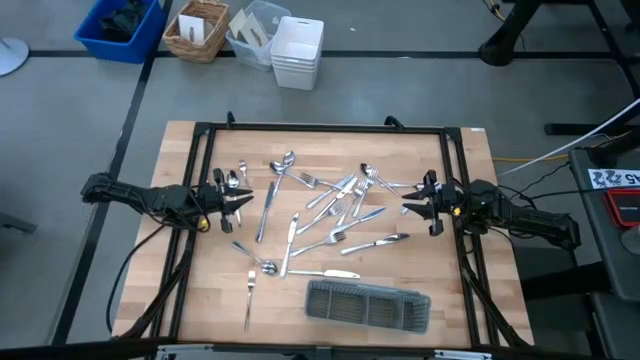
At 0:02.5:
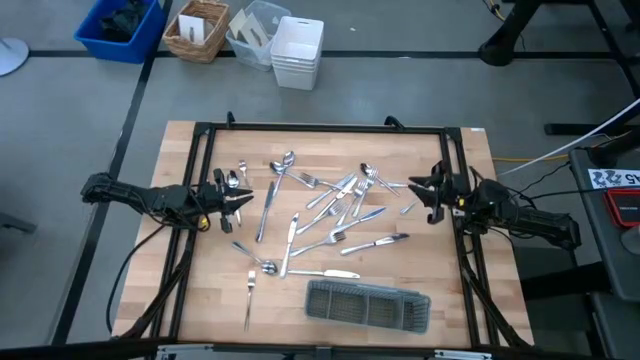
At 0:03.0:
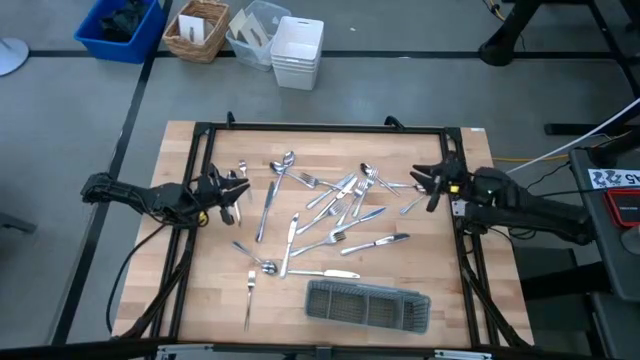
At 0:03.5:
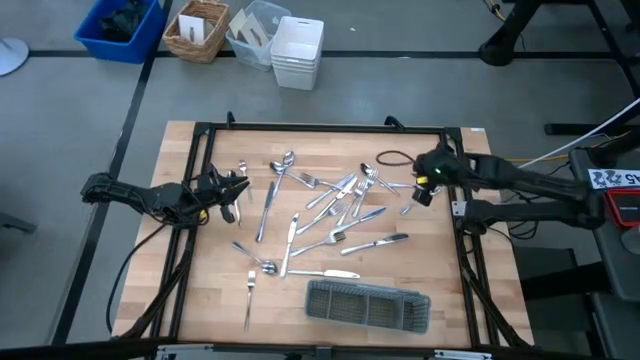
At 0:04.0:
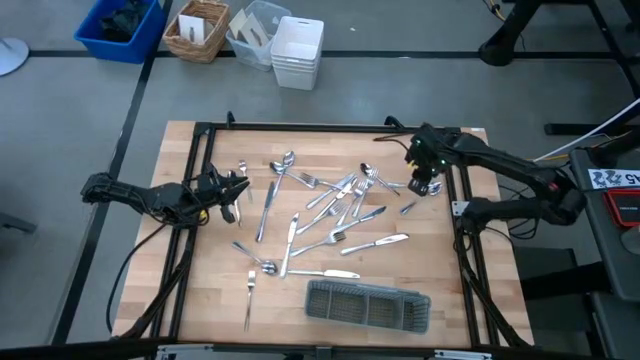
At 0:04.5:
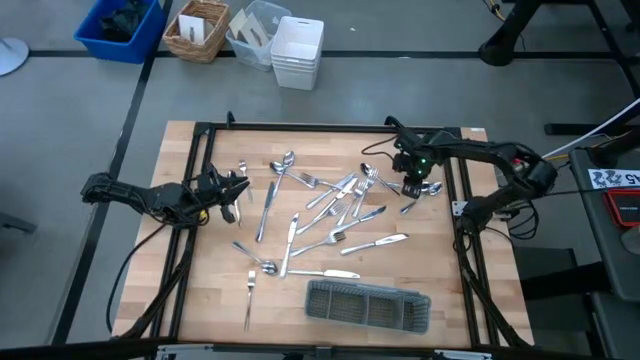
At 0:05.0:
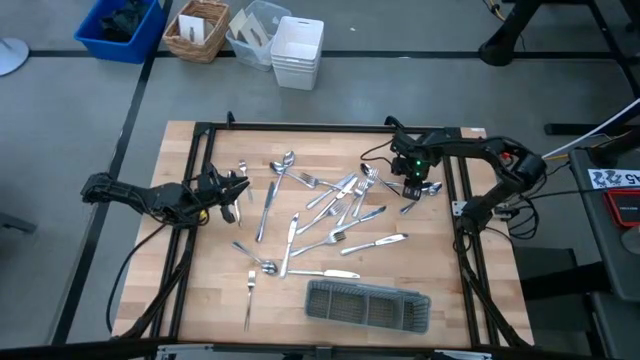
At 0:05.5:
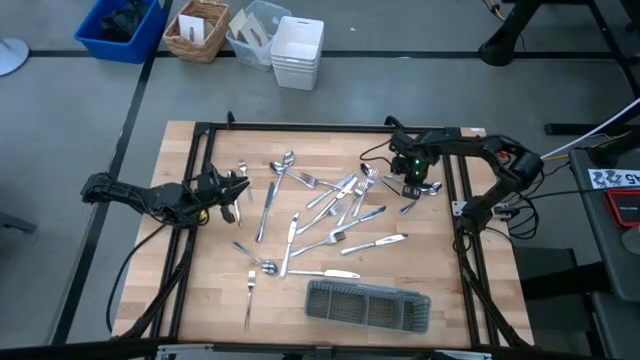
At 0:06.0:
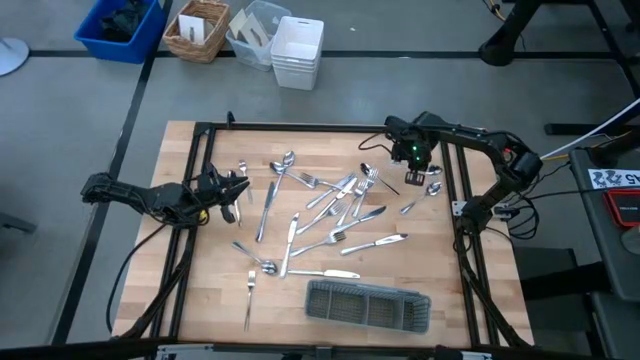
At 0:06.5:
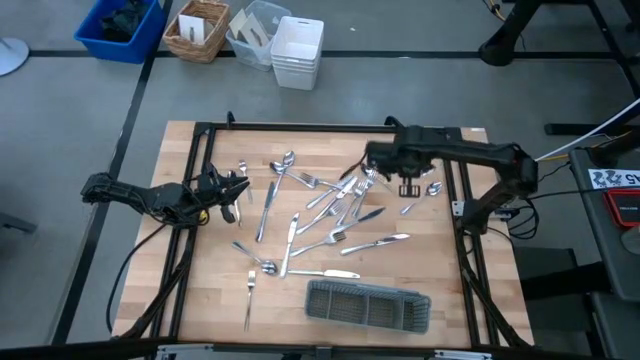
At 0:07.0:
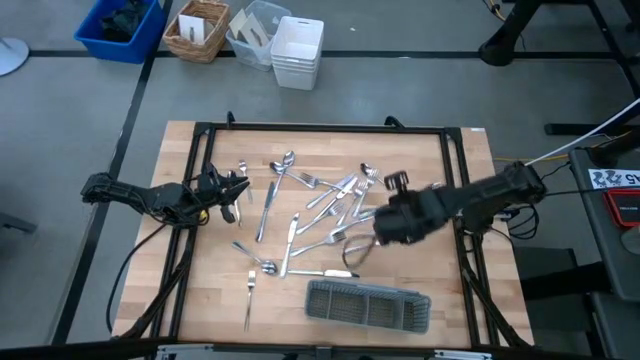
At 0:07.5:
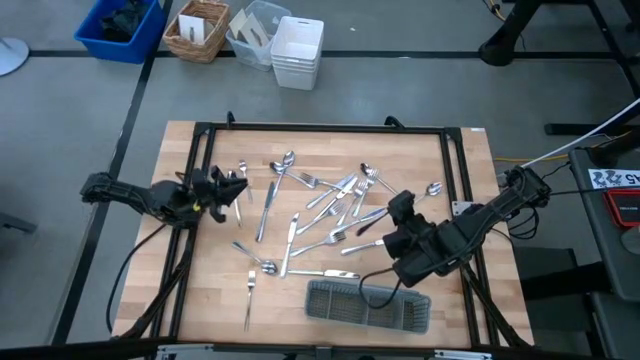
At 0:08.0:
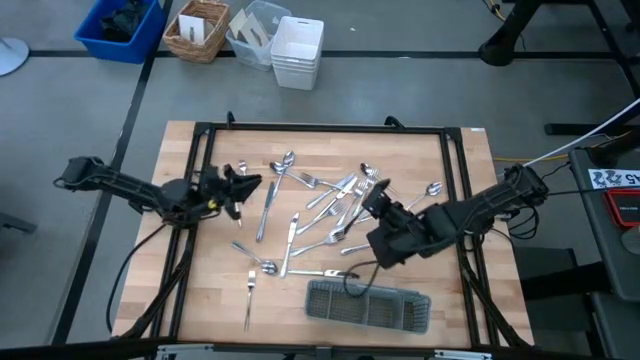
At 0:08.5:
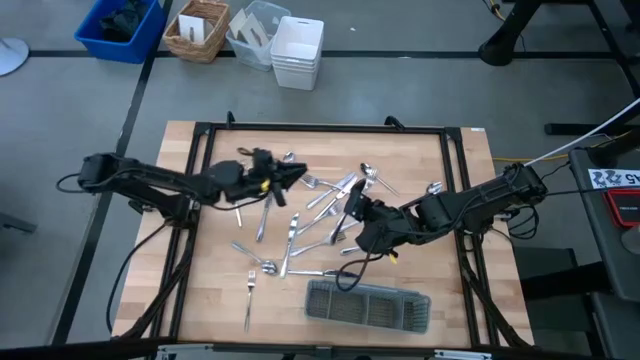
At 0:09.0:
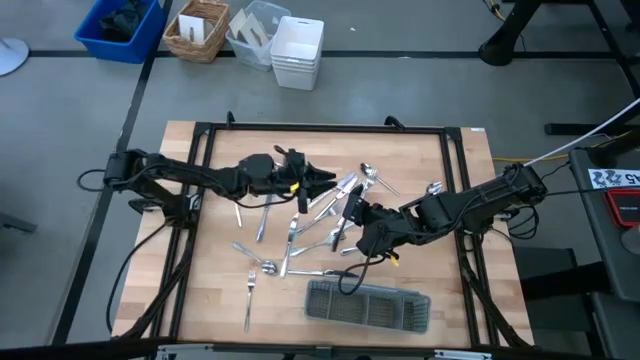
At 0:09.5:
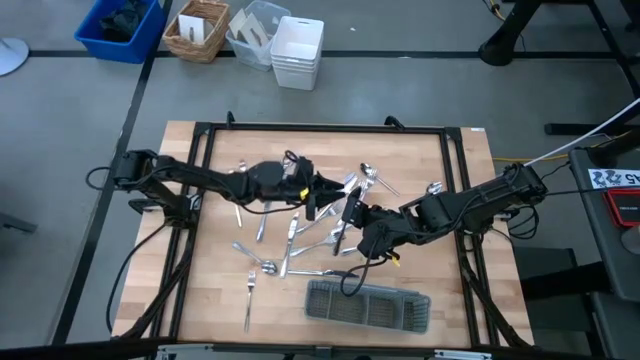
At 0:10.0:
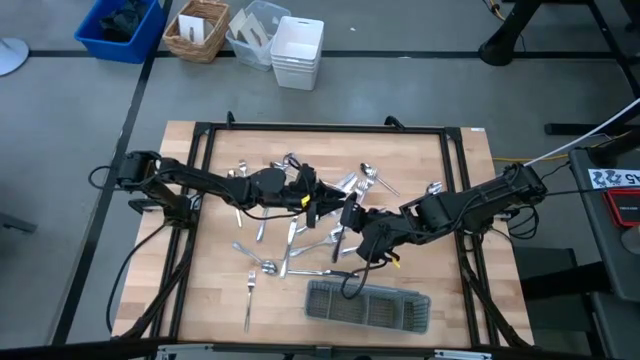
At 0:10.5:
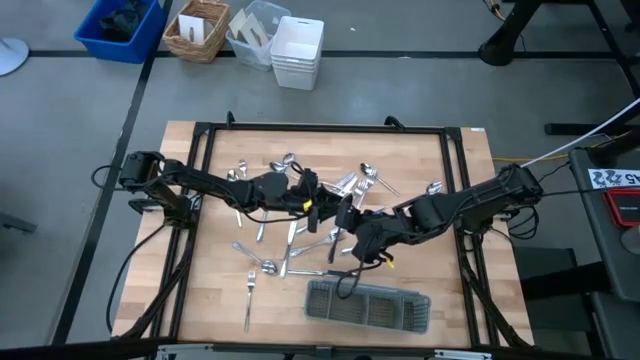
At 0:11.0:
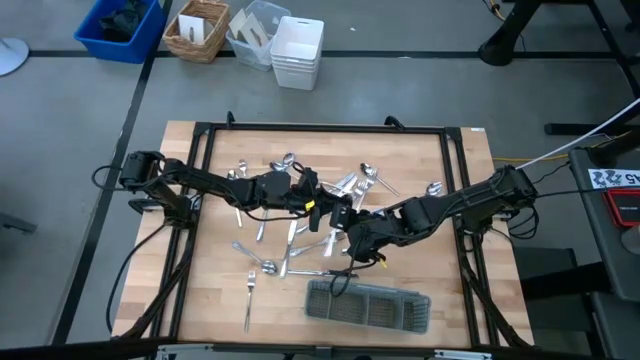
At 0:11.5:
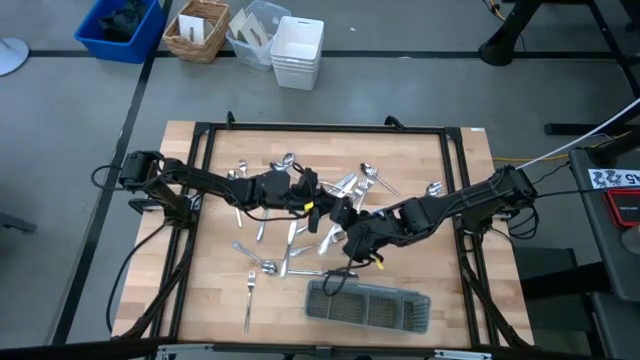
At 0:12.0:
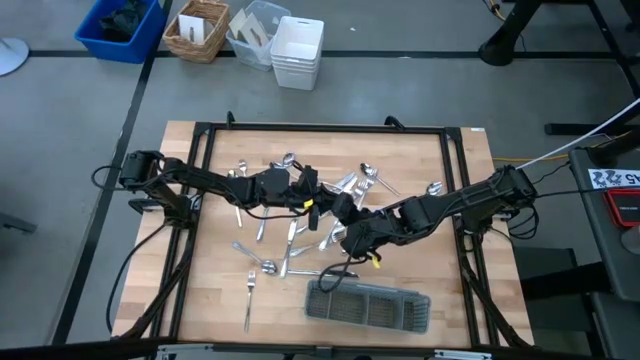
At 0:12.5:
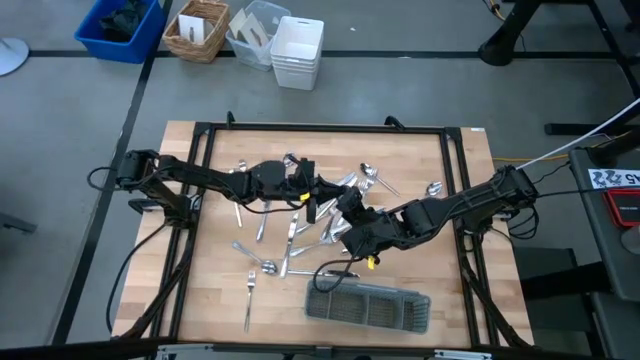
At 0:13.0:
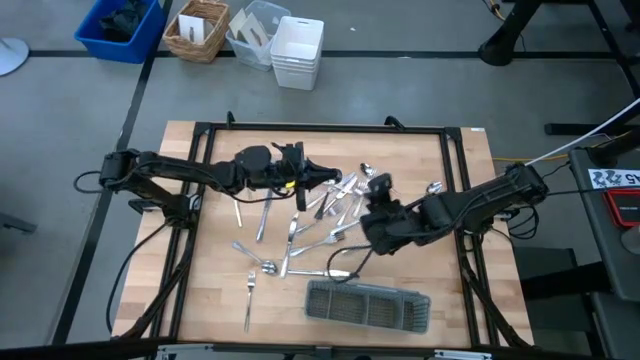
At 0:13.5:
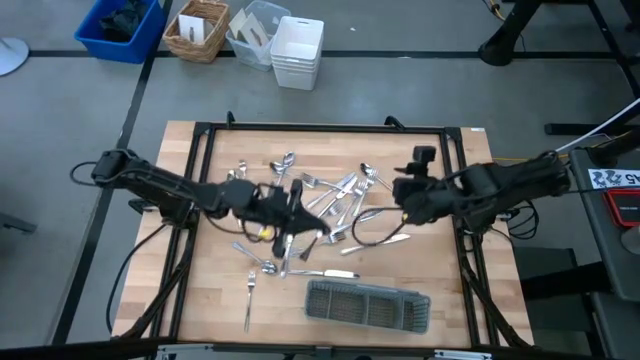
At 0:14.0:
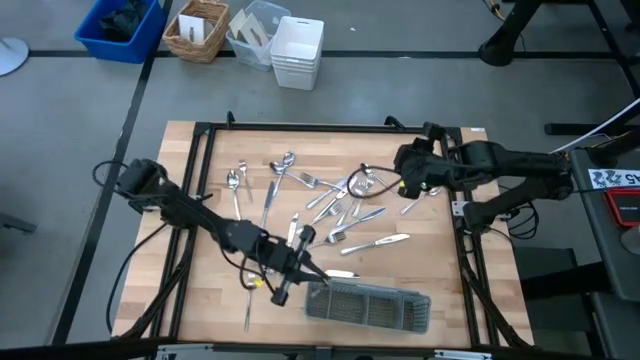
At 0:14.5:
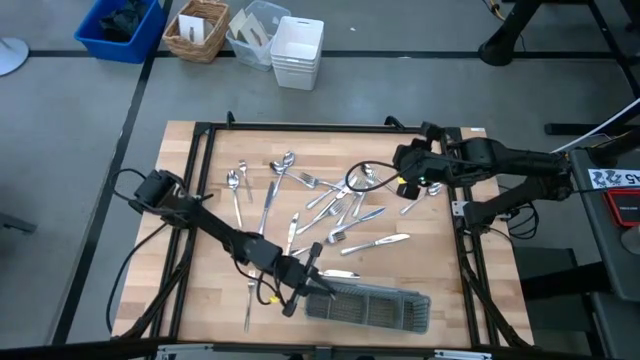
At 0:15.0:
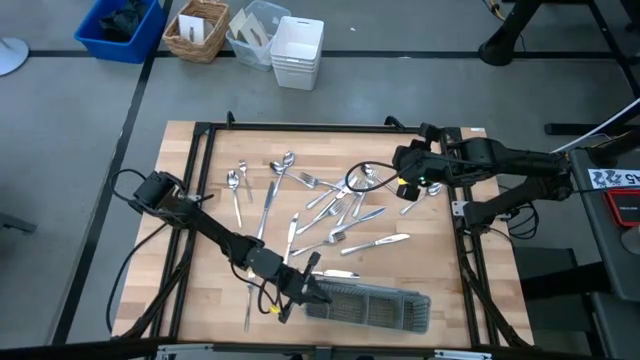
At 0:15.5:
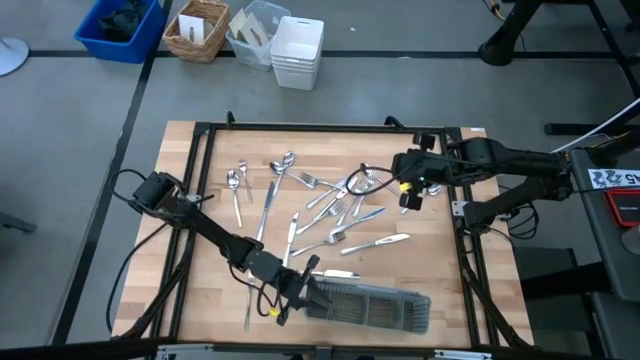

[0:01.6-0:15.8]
Task: Sort silverware
Put the spoon into the gray silverware rack

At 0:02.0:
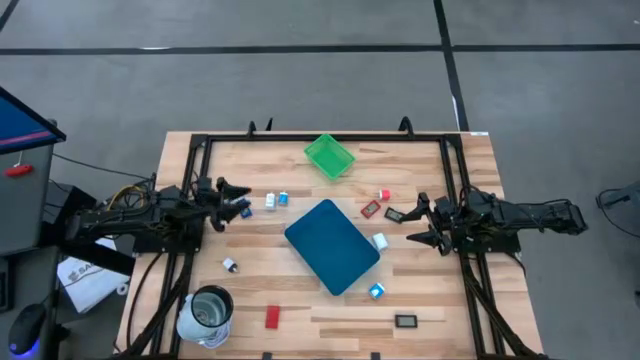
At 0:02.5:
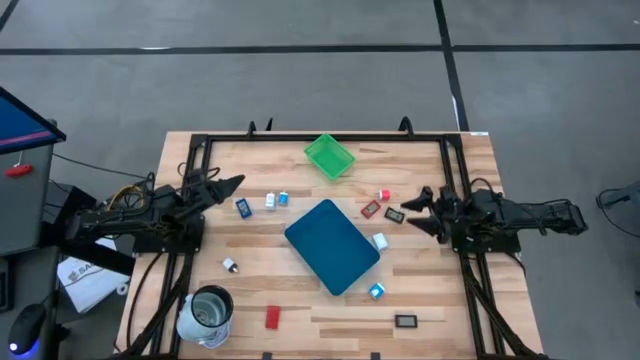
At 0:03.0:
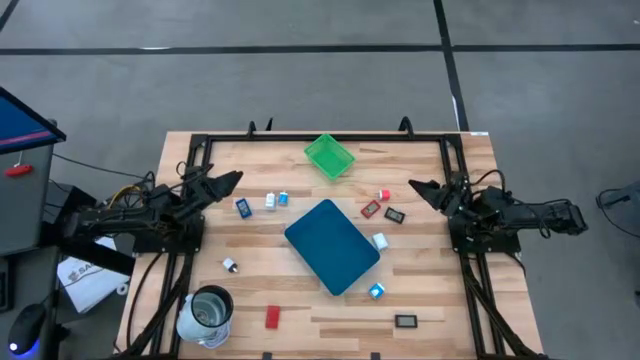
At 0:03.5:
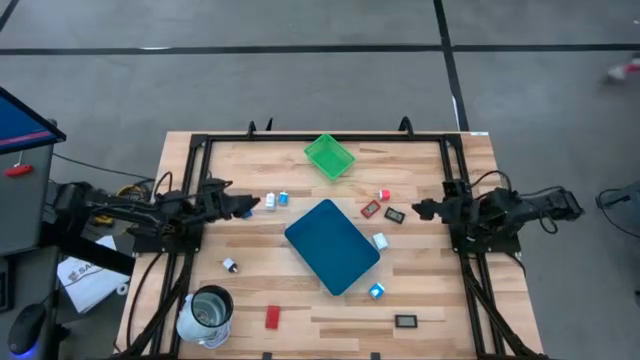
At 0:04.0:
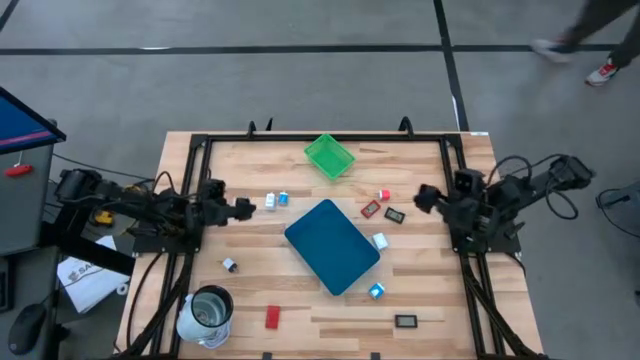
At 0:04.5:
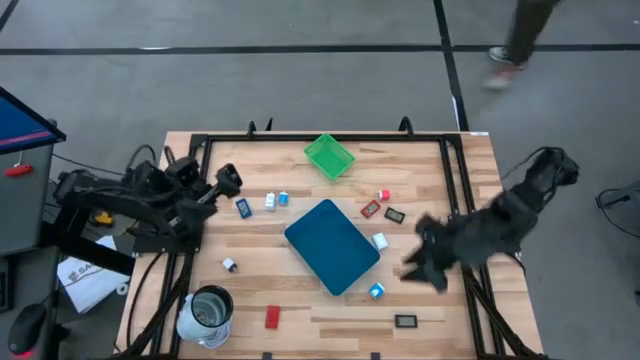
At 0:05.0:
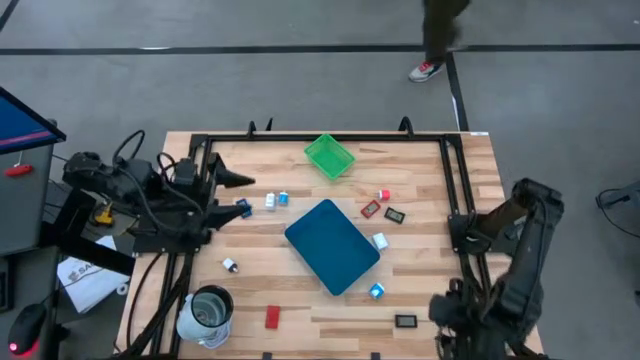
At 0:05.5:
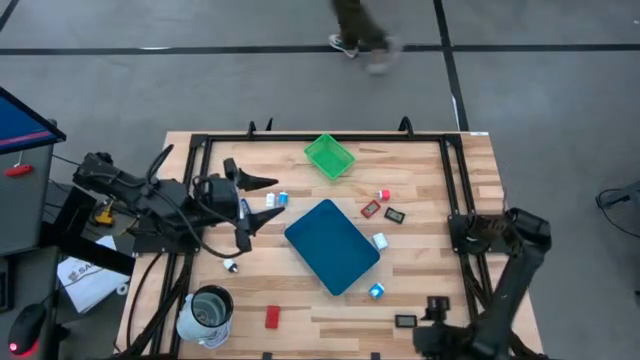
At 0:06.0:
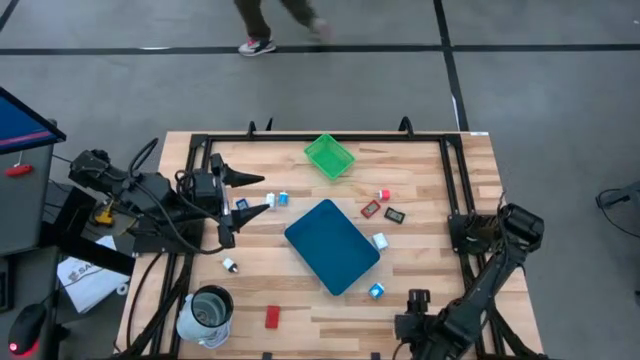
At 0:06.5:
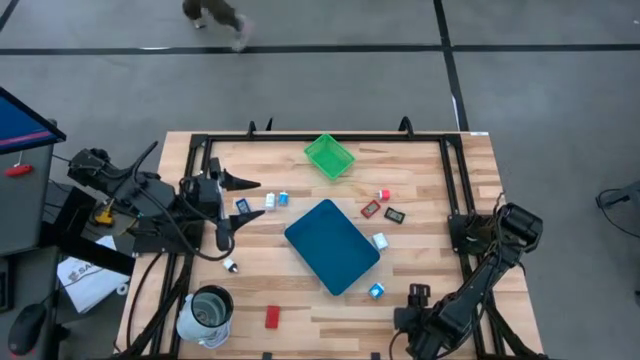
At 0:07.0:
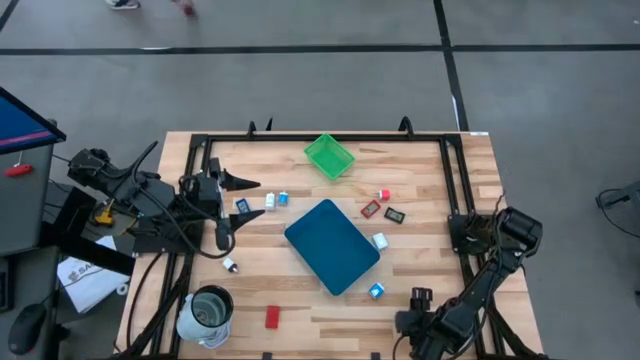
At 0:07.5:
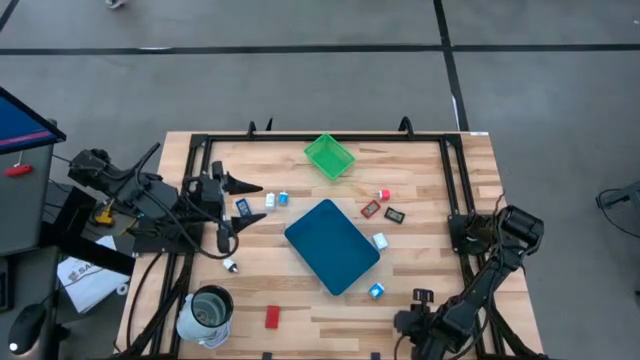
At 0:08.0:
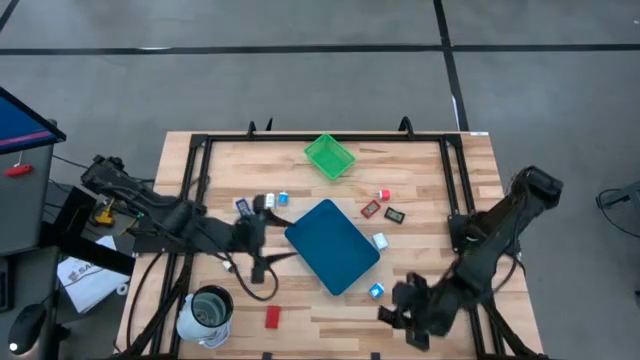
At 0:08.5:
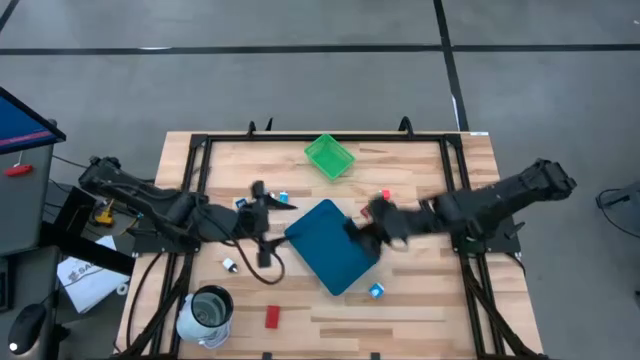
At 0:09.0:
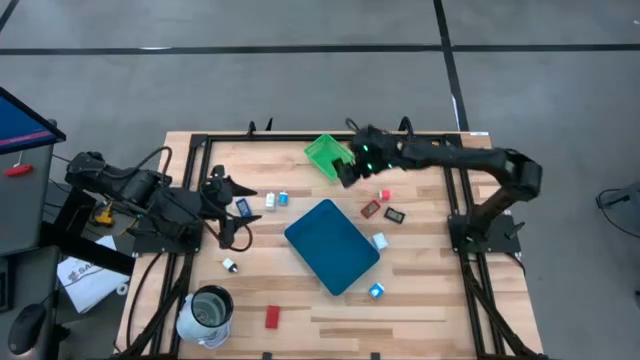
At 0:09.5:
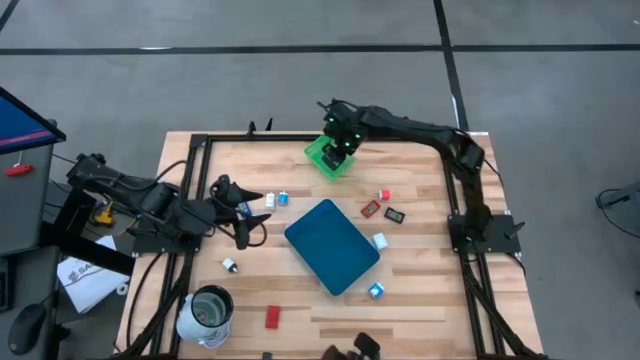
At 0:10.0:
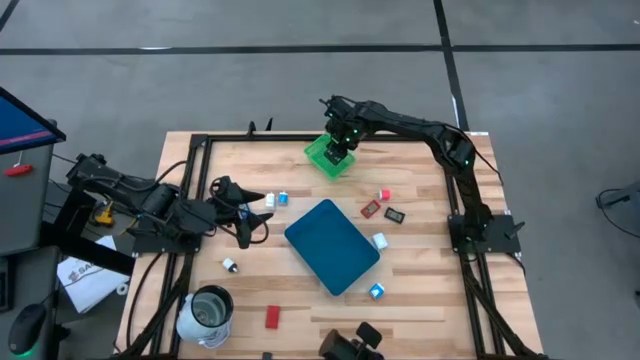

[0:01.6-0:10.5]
Task: Pick & Place Office items
Put the bottom black digital timer into the green bin
